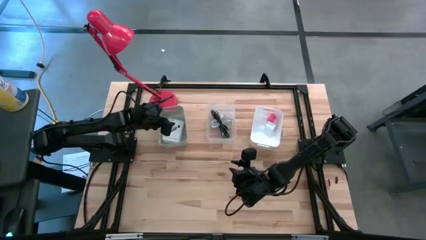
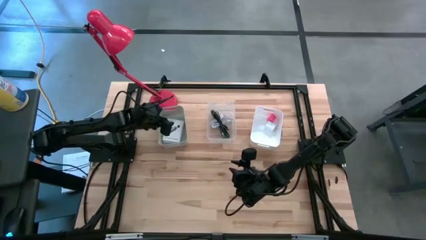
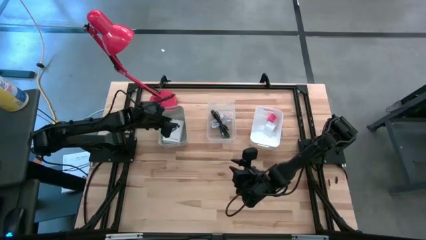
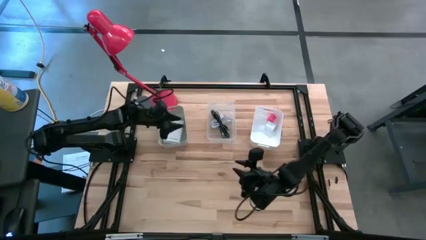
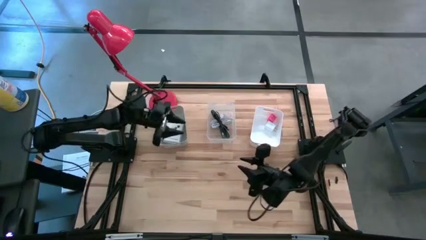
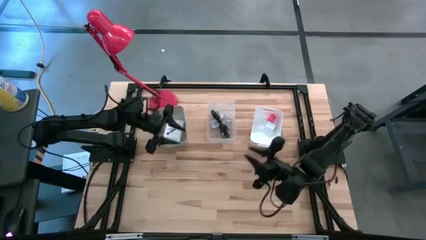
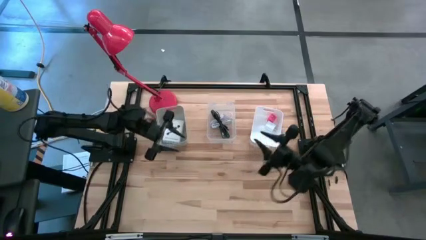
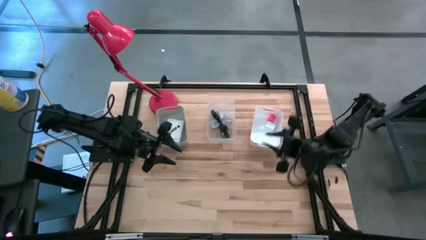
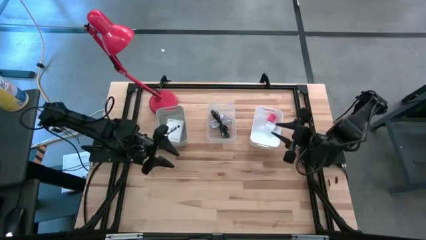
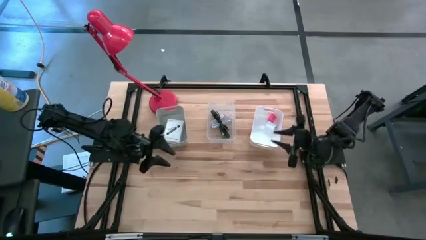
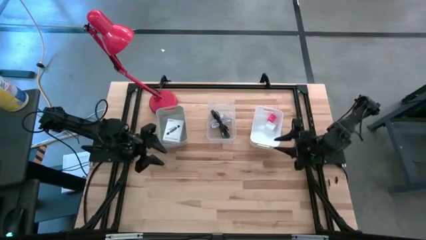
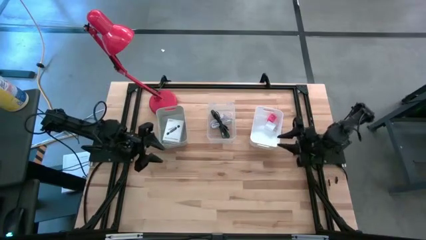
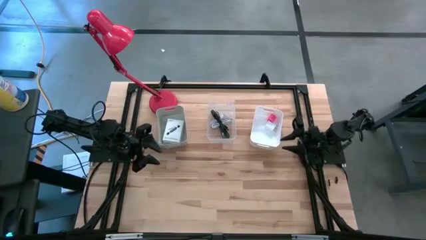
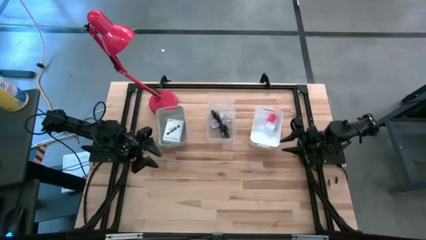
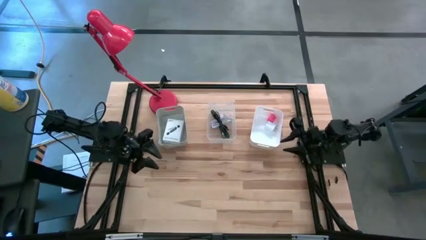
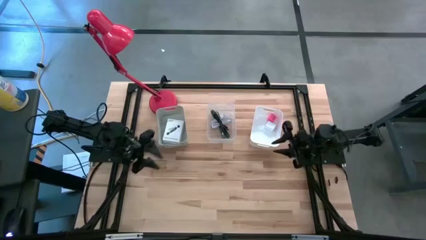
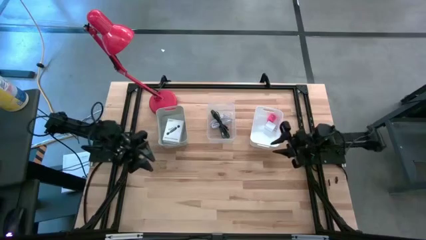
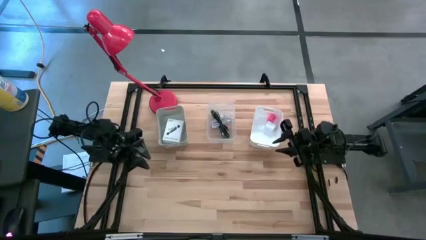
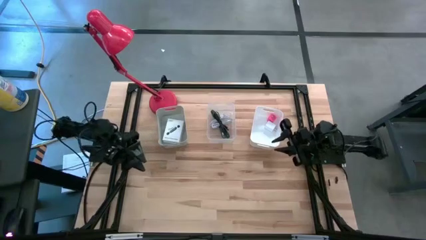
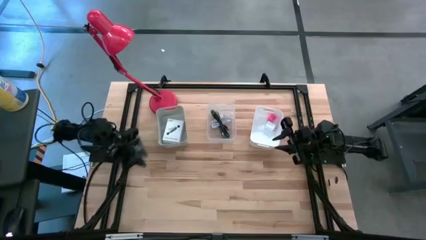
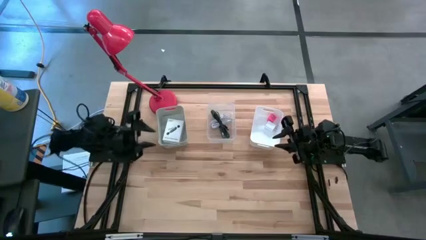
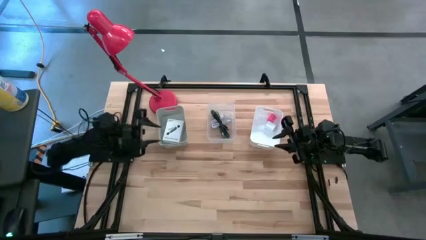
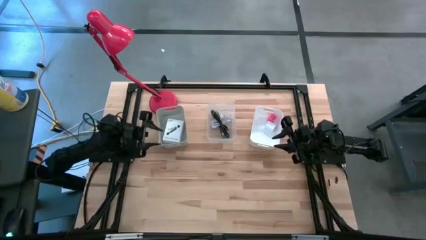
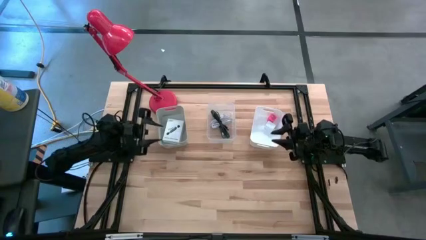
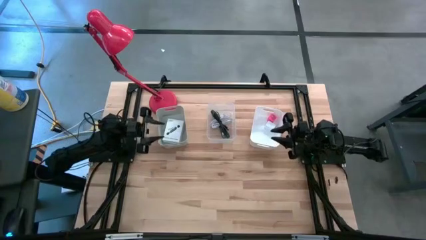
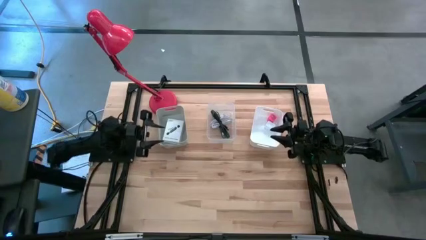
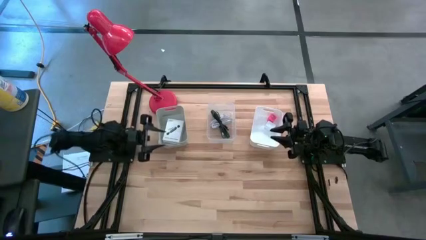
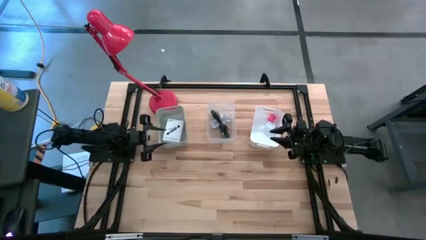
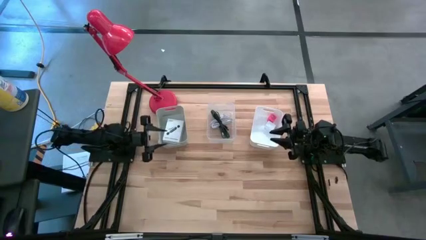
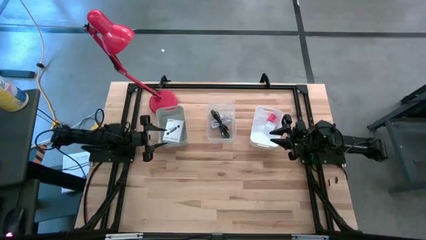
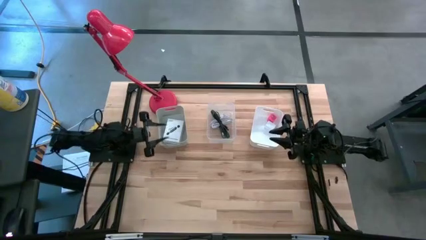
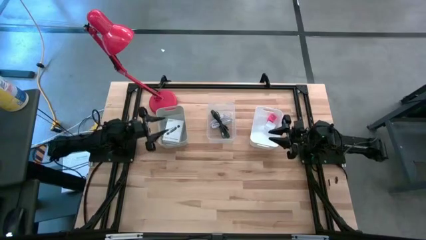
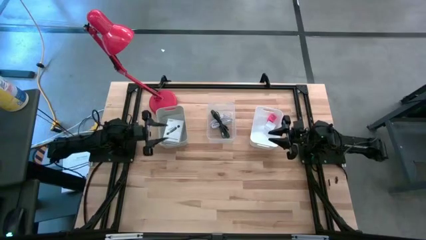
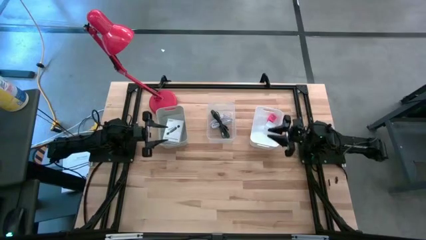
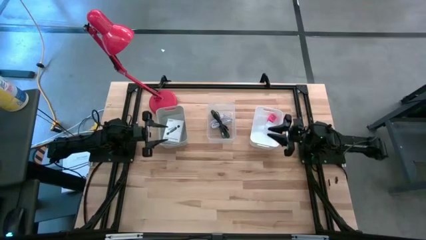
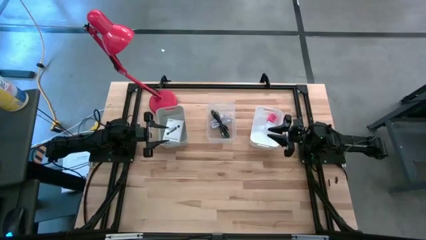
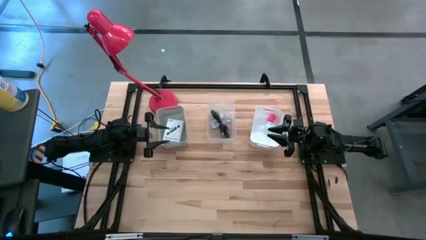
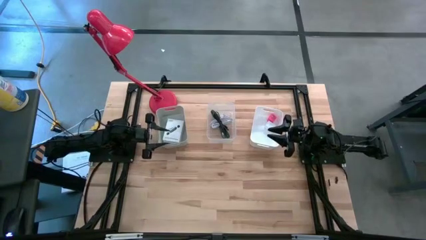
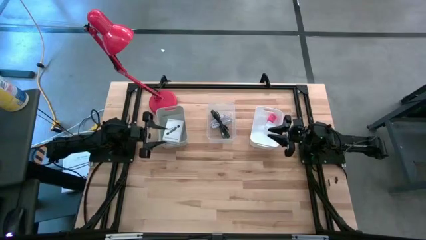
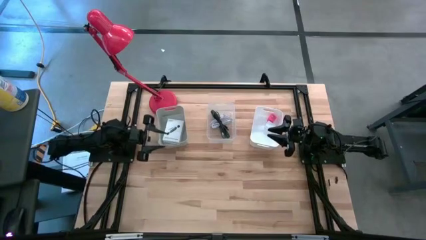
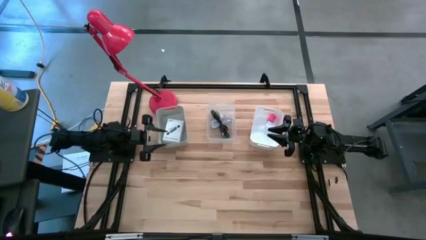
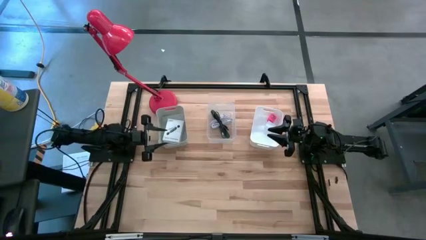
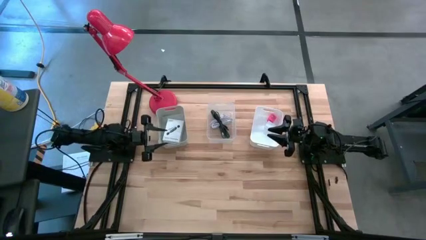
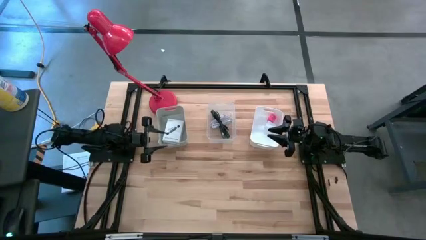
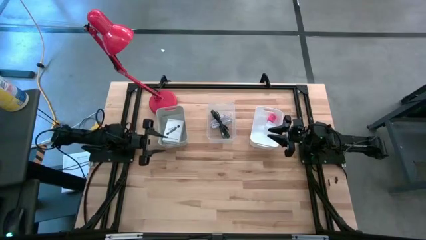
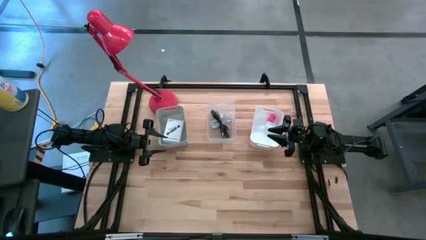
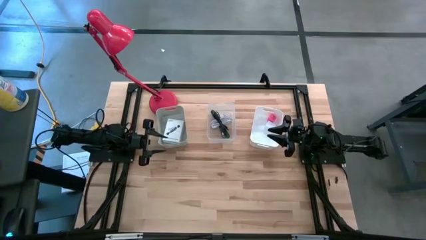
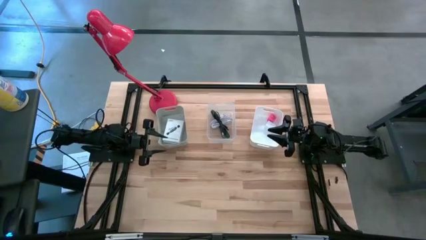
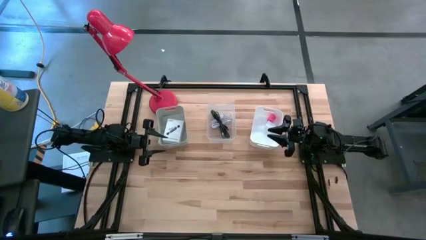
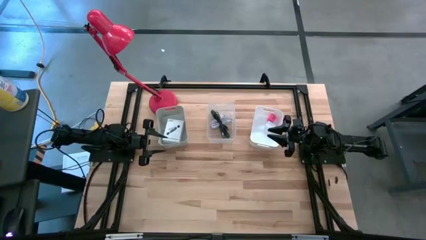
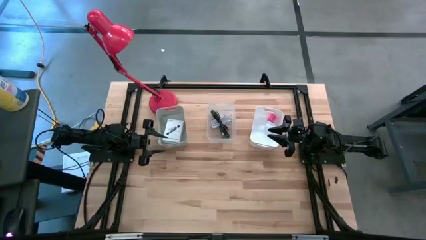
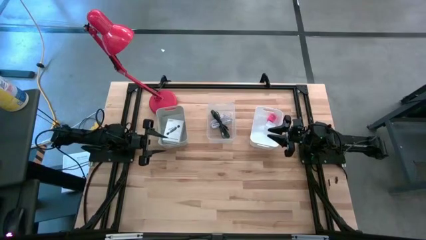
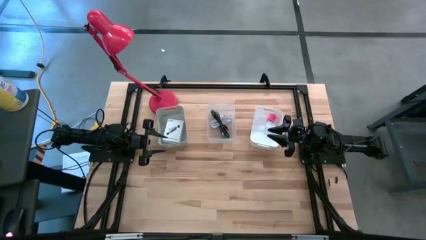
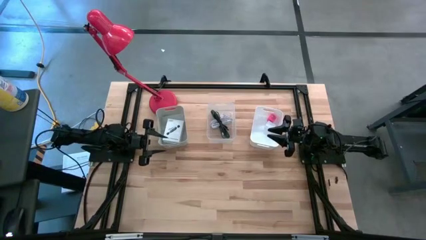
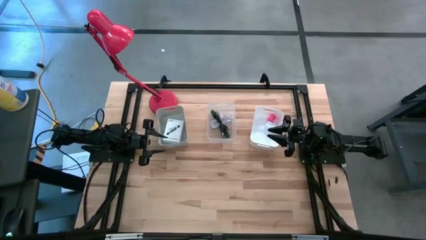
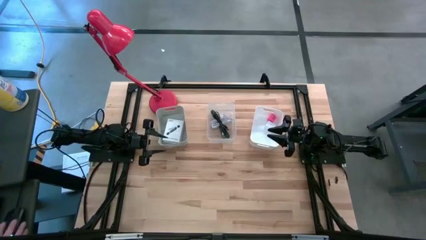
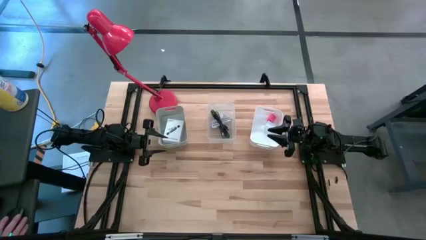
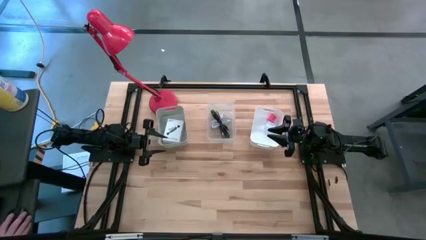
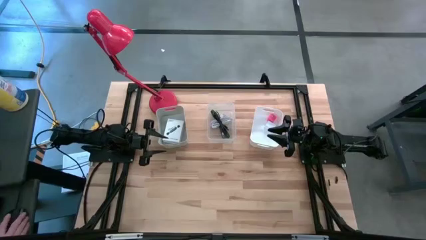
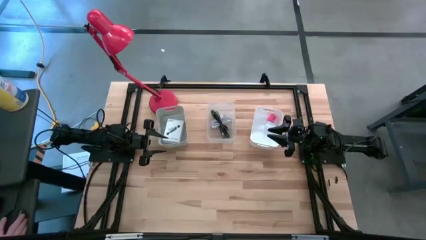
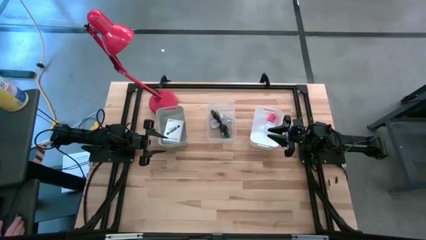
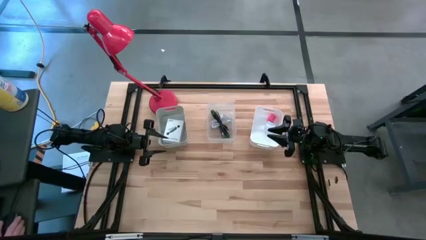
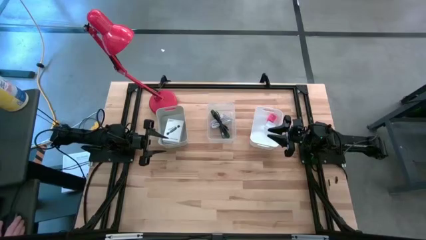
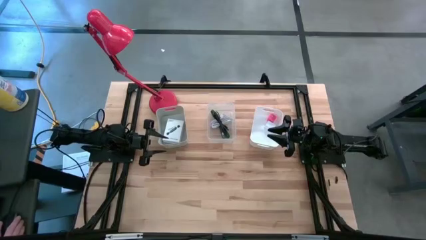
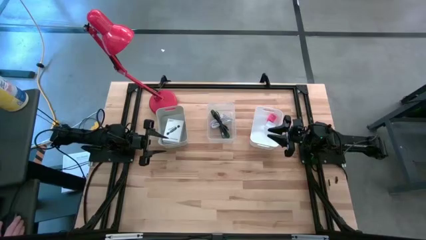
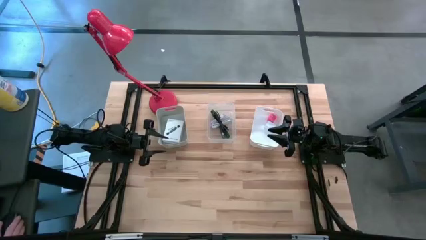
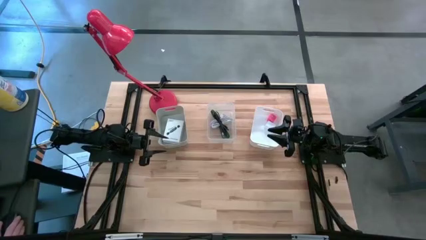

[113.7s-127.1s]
Task: Pick and place items into bin
Return to Home Position

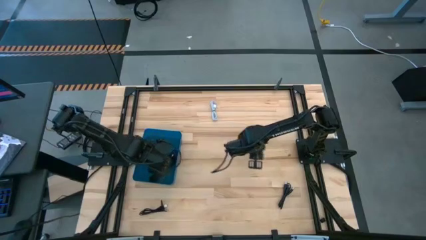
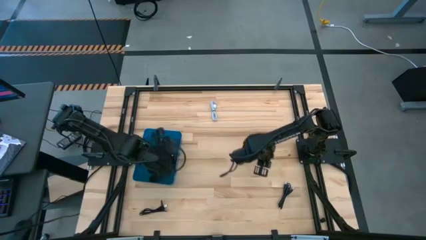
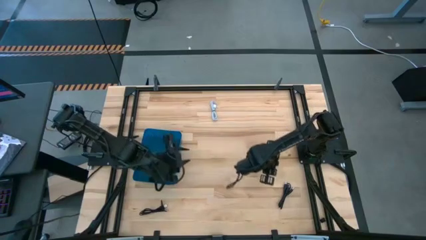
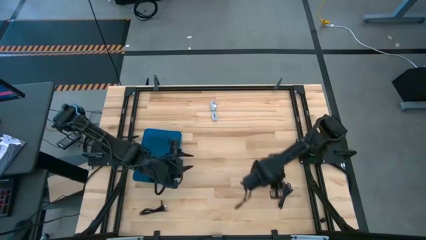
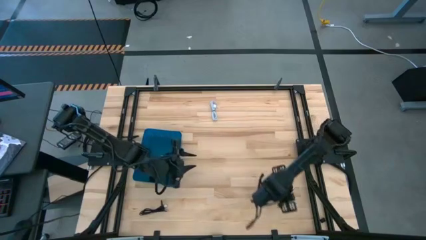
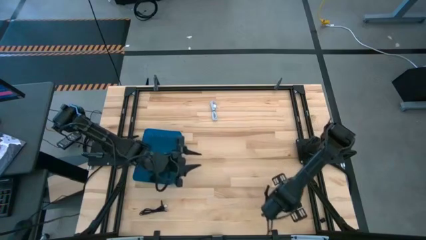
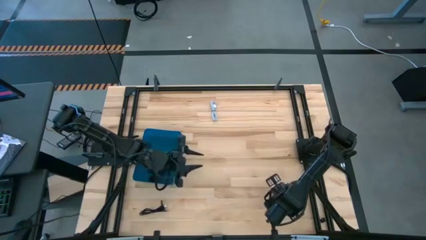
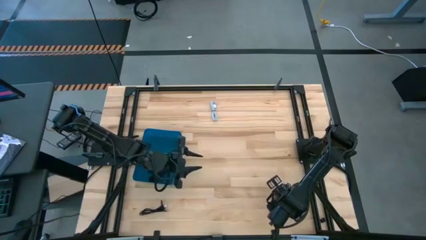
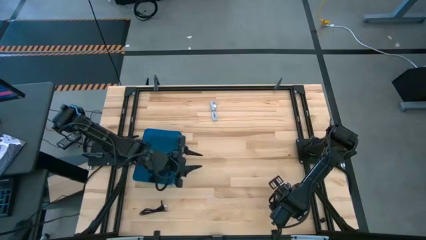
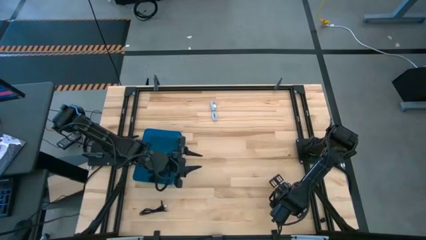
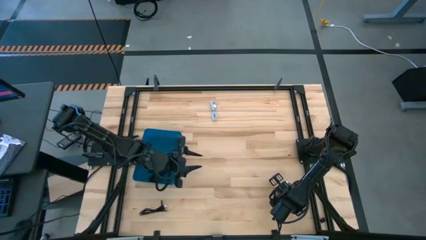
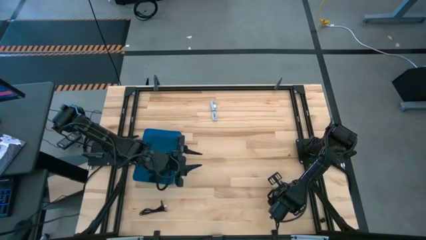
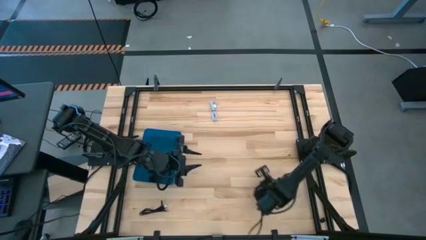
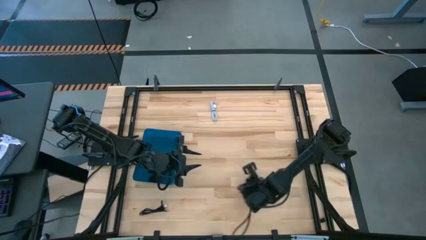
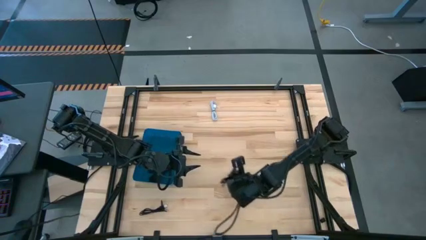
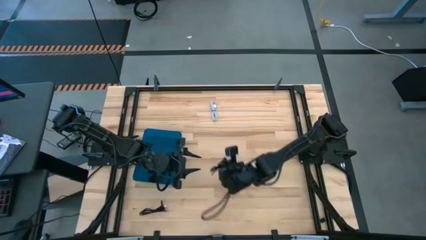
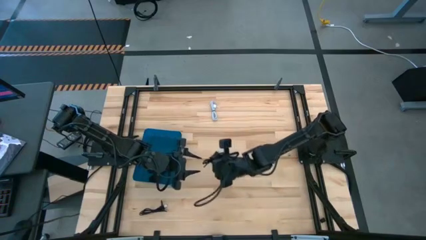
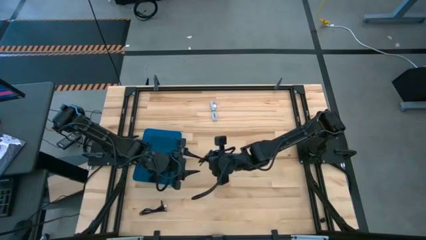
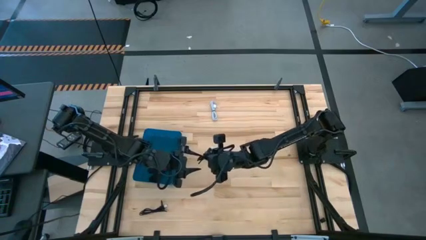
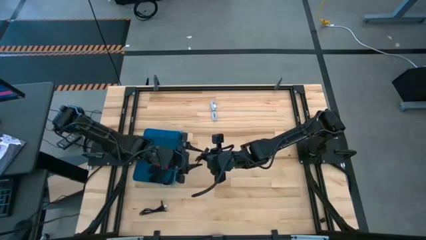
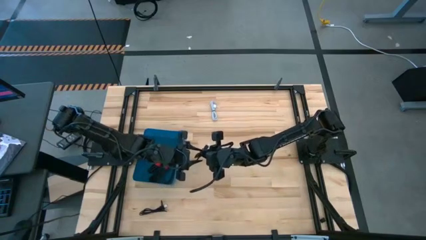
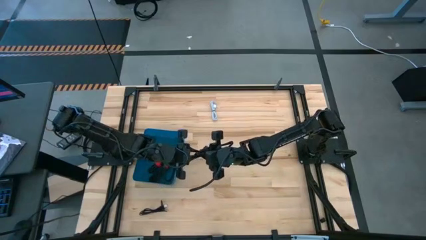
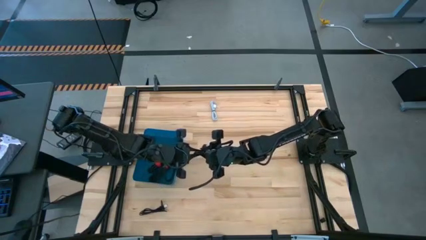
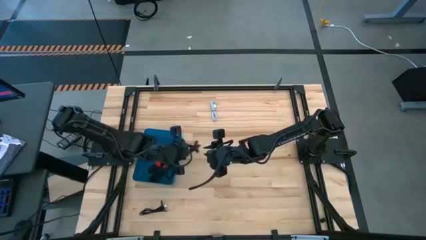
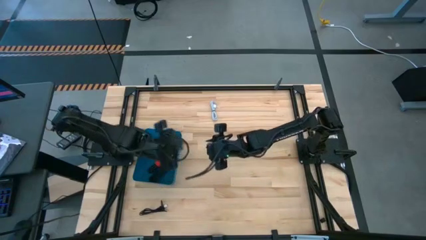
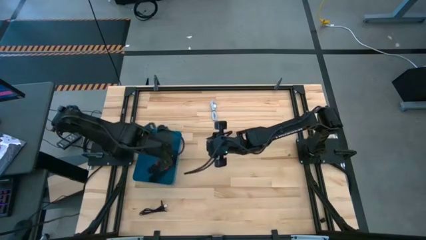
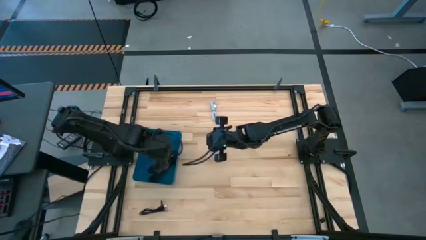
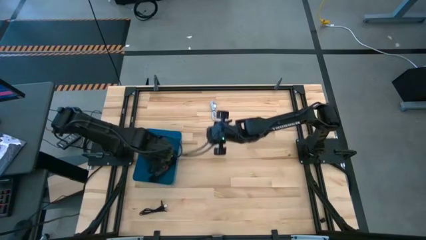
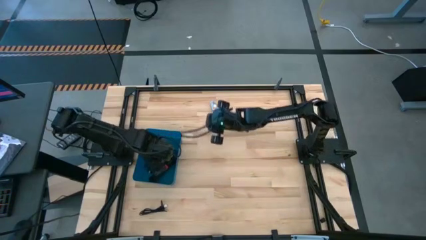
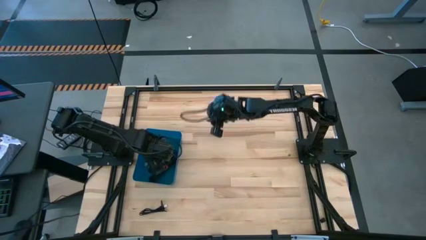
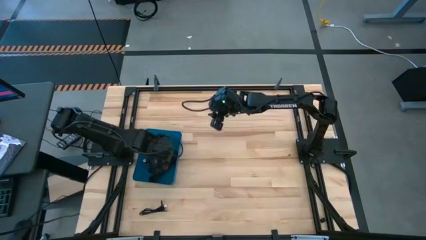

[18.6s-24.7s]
Task: Pick and place USB-C Cables
Put the right black charger cable into the blue bin
